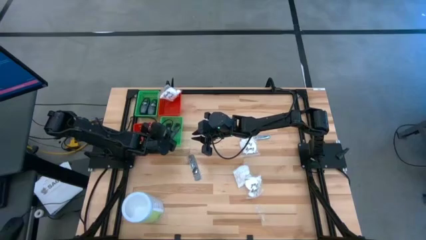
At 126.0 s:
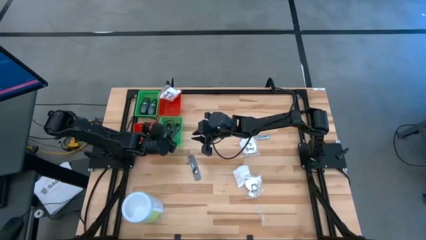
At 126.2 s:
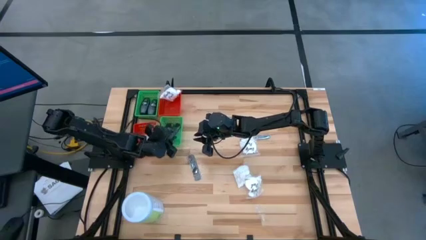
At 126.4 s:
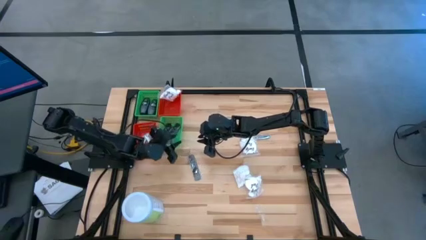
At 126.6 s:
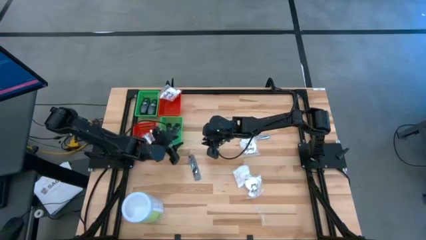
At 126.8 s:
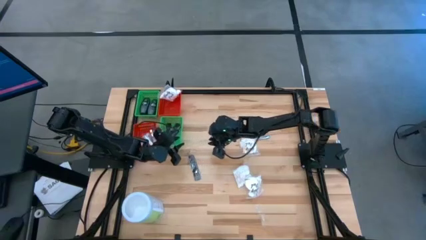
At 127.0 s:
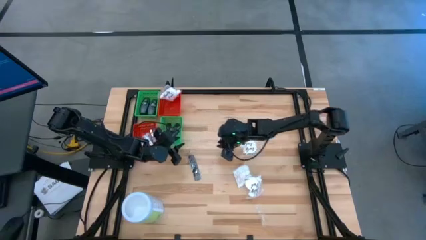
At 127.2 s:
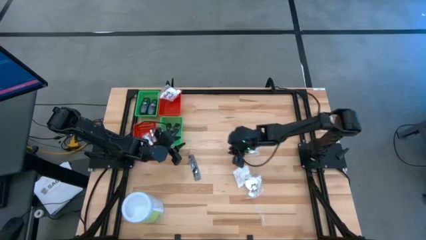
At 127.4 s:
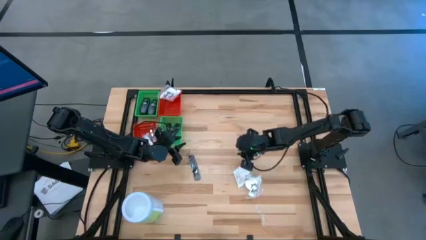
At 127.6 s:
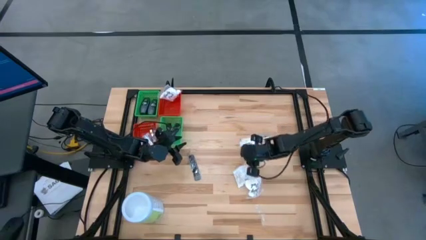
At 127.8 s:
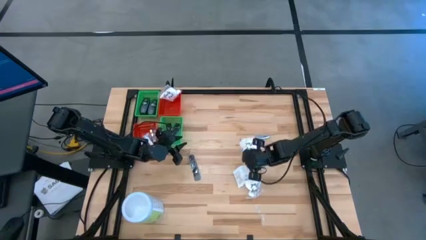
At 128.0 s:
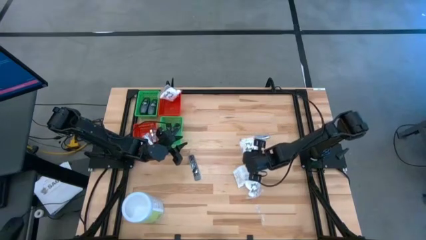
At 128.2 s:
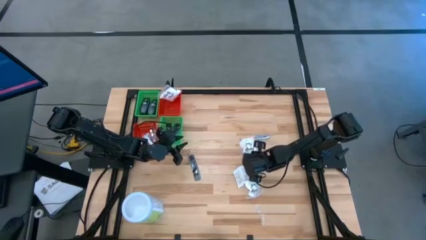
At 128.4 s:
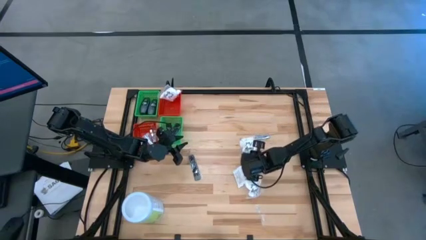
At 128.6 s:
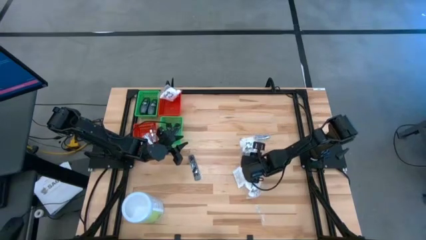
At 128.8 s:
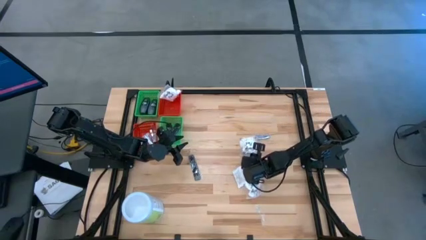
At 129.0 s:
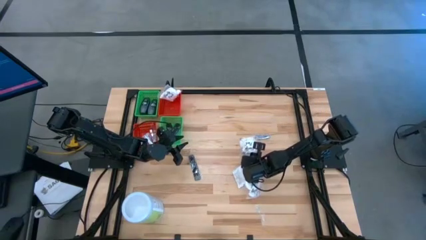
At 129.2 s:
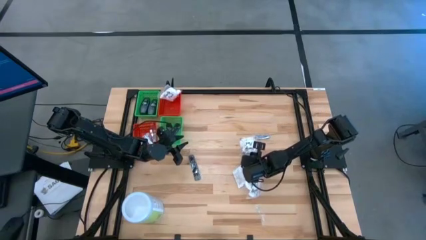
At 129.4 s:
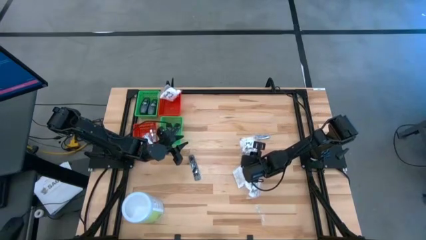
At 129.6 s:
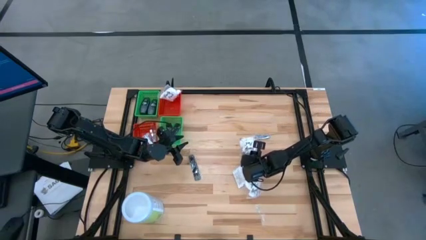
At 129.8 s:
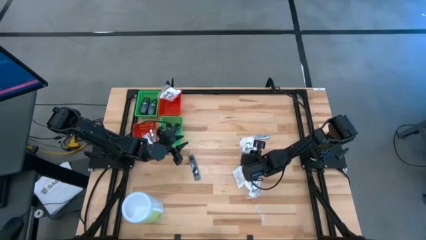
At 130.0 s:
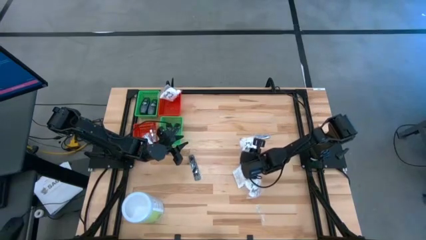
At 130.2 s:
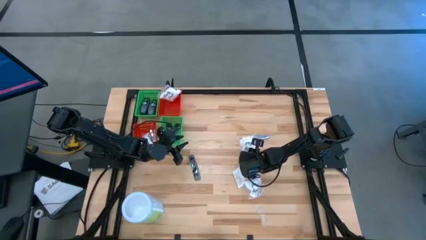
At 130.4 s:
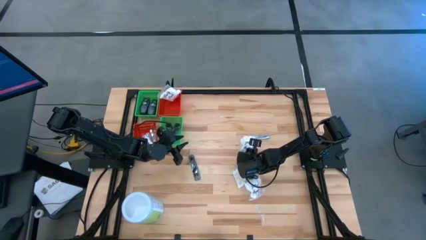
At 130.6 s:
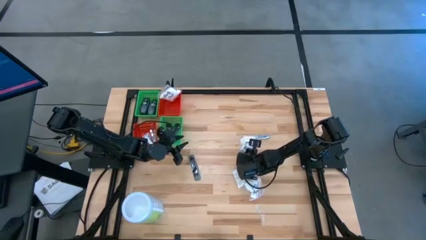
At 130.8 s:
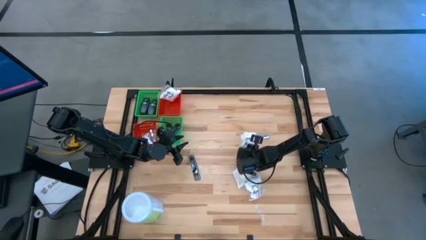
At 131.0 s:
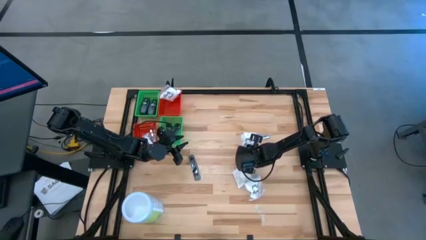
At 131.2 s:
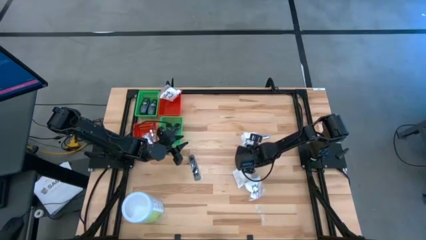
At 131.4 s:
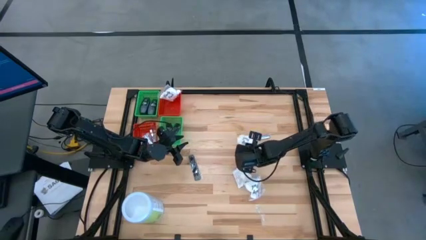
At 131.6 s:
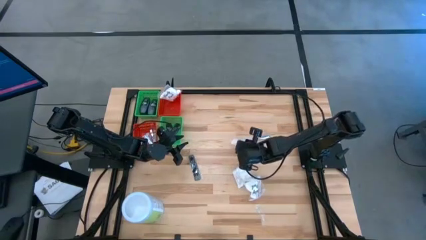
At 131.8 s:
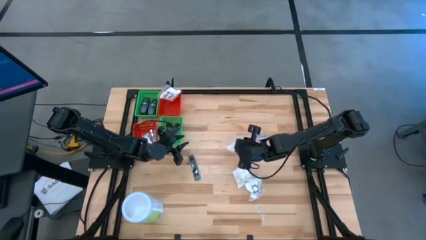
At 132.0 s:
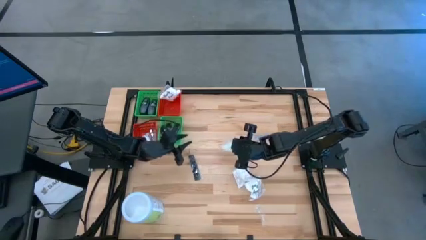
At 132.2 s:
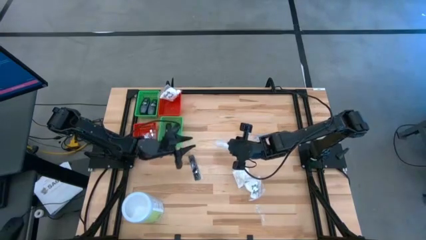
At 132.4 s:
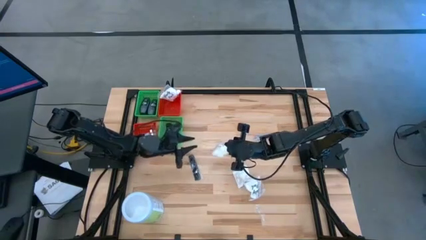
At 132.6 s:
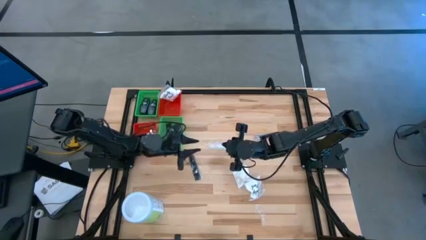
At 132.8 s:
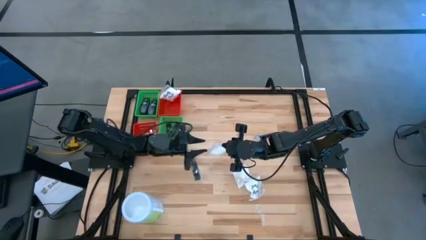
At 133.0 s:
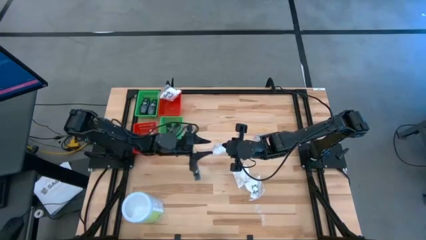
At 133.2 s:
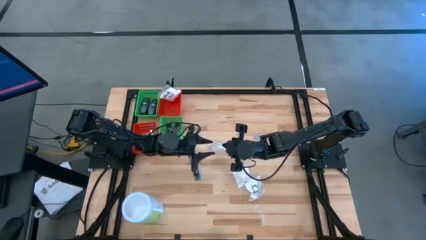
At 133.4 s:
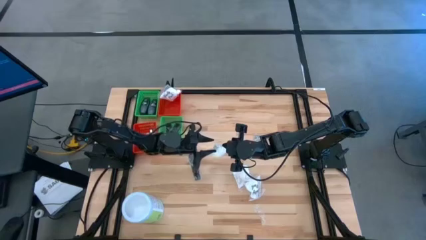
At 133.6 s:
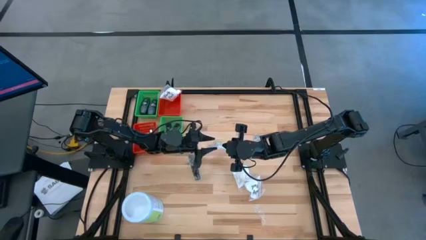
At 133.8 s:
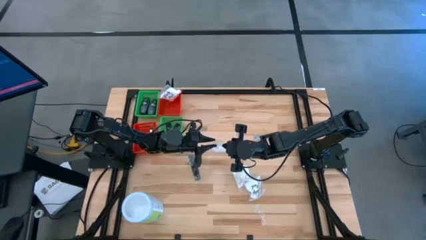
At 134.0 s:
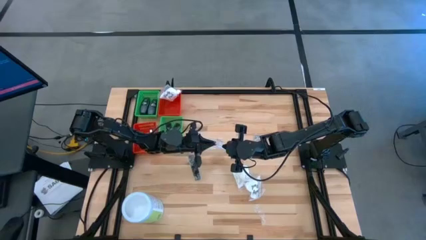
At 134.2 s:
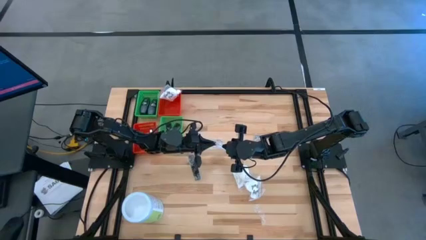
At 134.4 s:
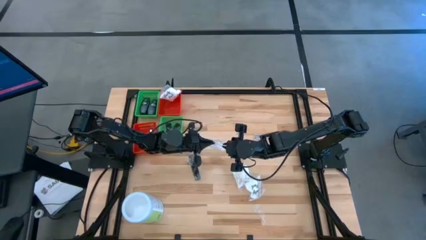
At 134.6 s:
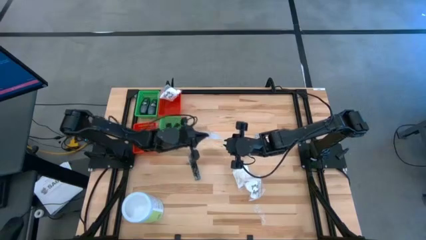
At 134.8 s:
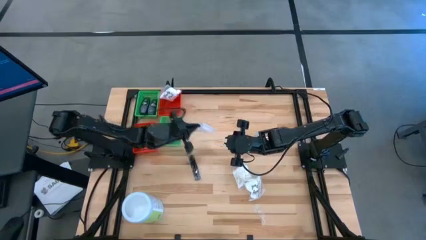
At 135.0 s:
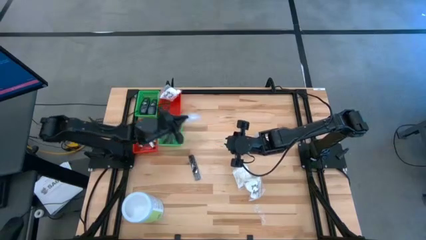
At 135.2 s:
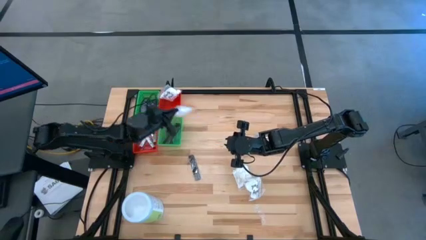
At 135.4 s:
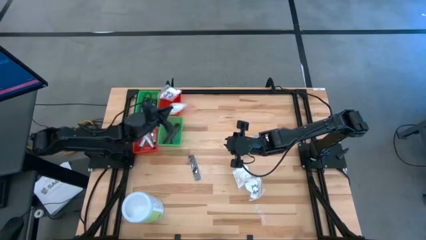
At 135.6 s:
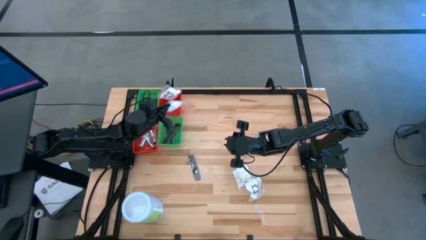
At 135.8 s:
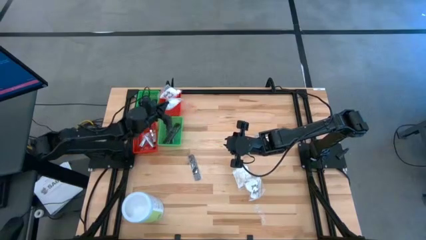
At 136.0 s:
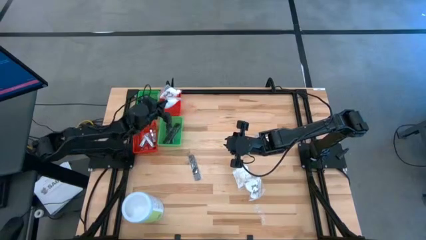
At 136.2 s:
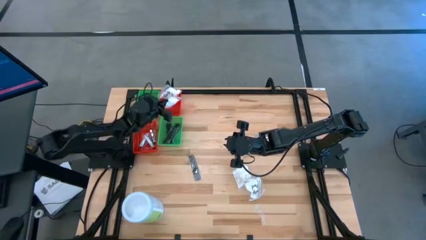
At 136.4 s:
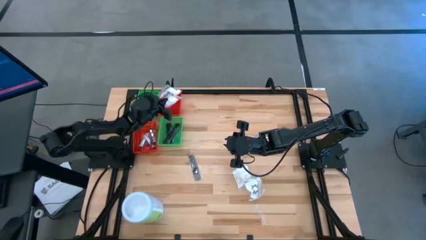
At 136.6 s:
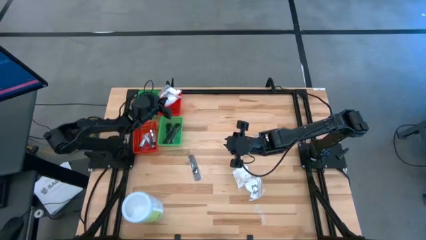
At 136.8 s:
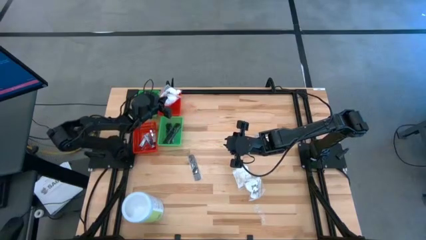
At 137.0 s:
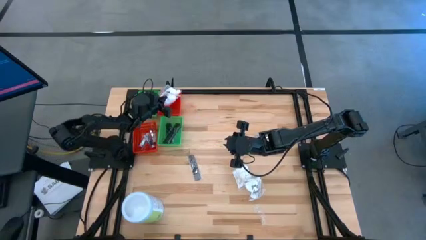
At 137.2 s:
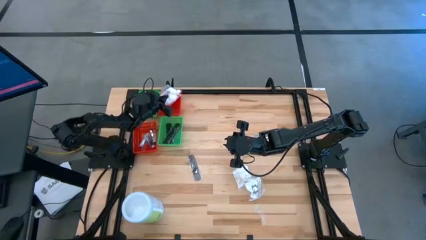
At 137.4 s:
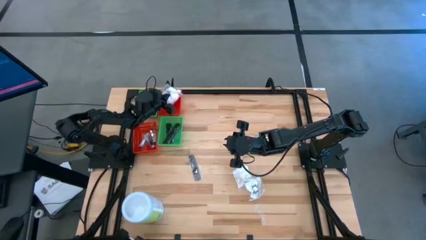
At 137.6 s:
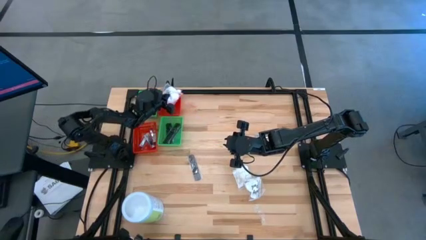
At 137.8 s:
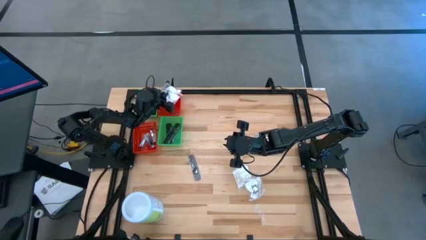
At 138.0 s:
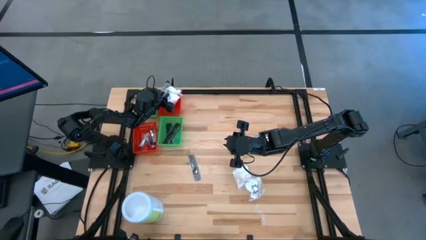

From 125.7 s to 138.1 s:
Task: Pick & Place Travel size toiletries
Put the white cotton pack into the top red bin
